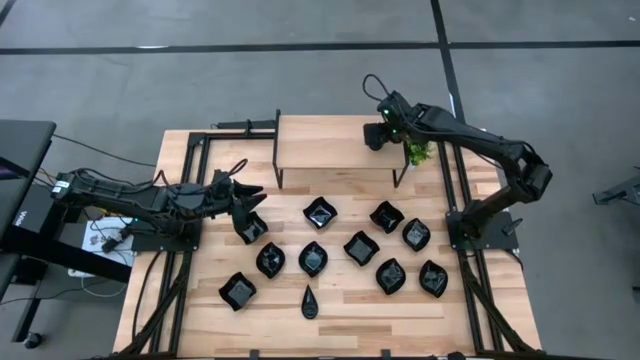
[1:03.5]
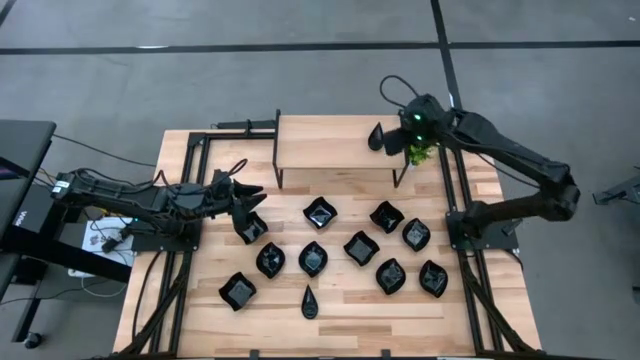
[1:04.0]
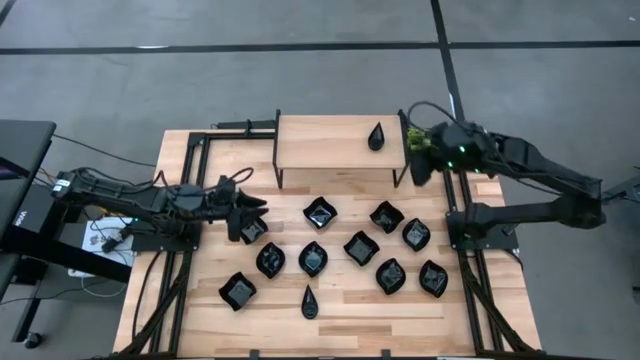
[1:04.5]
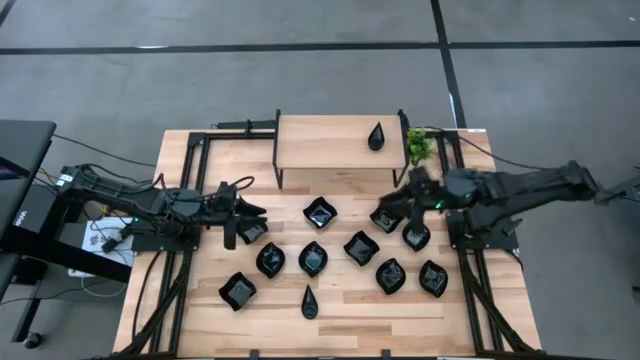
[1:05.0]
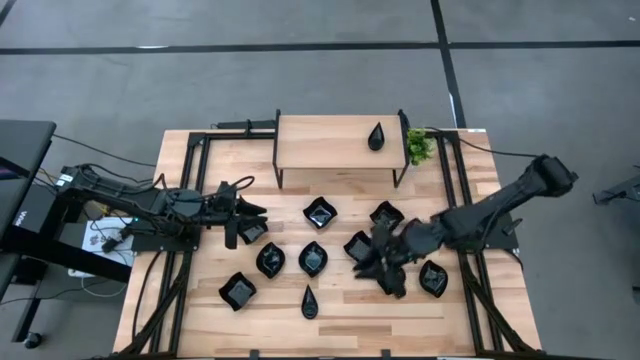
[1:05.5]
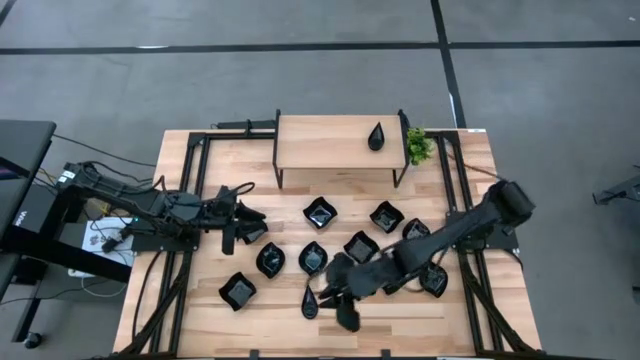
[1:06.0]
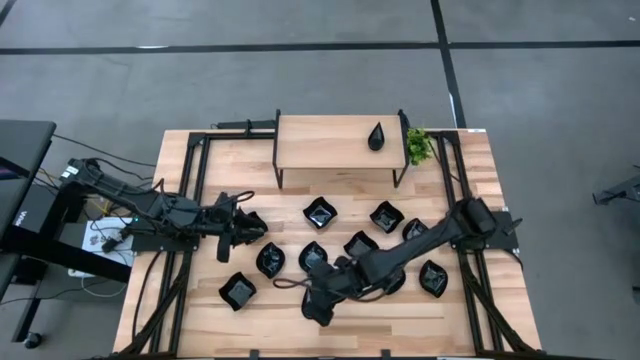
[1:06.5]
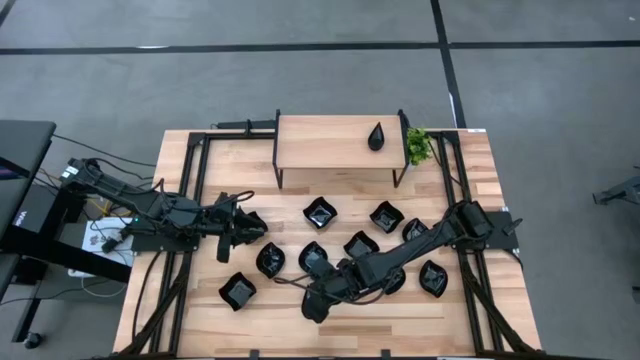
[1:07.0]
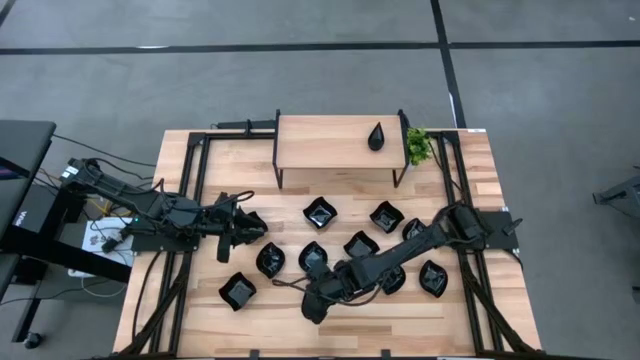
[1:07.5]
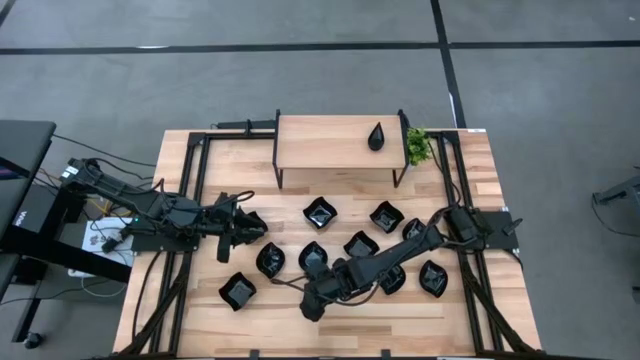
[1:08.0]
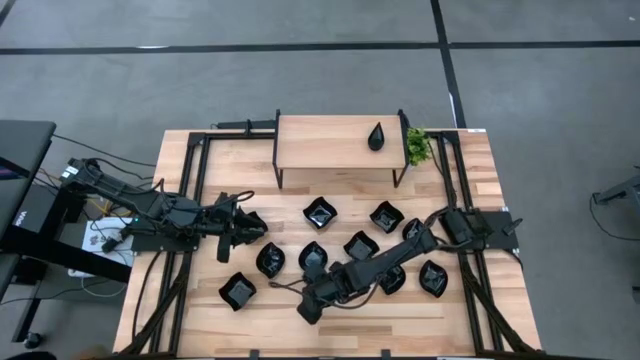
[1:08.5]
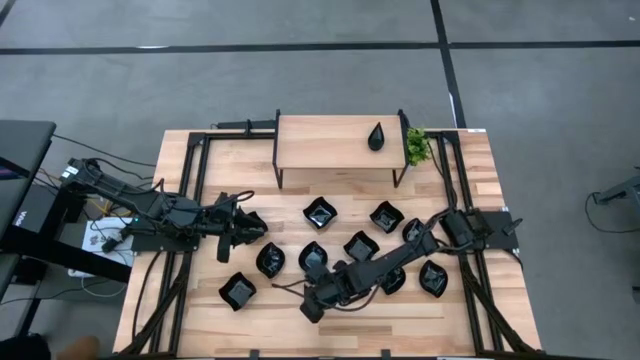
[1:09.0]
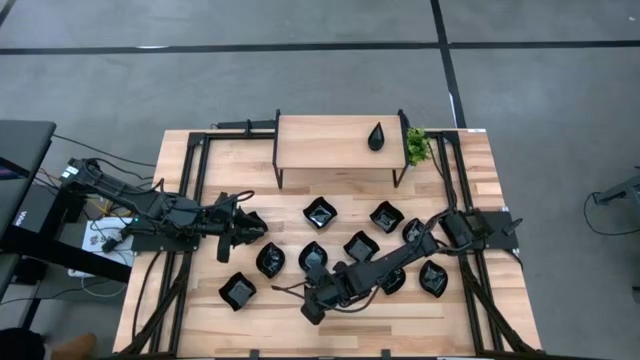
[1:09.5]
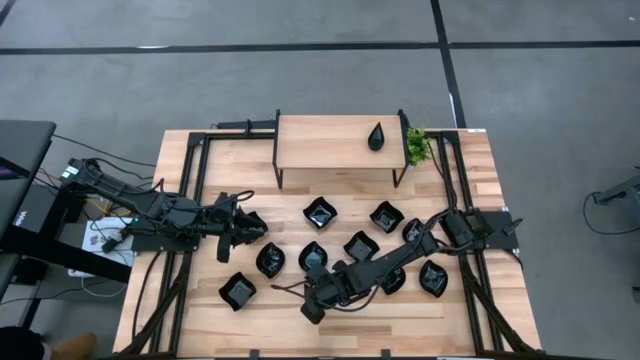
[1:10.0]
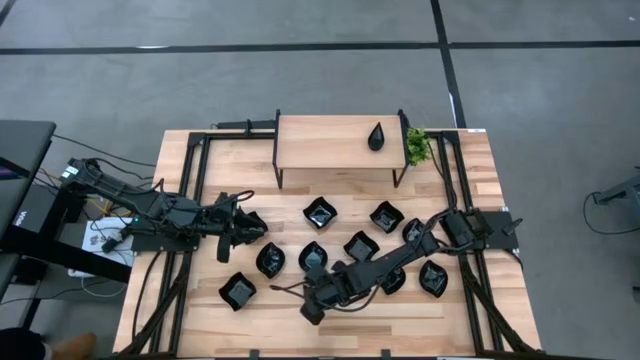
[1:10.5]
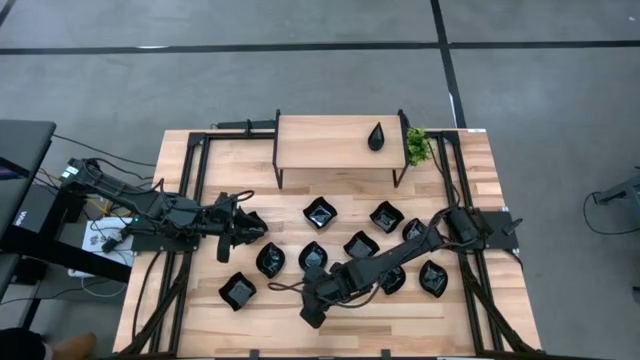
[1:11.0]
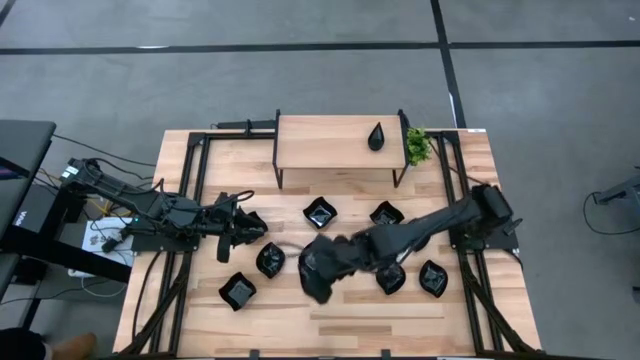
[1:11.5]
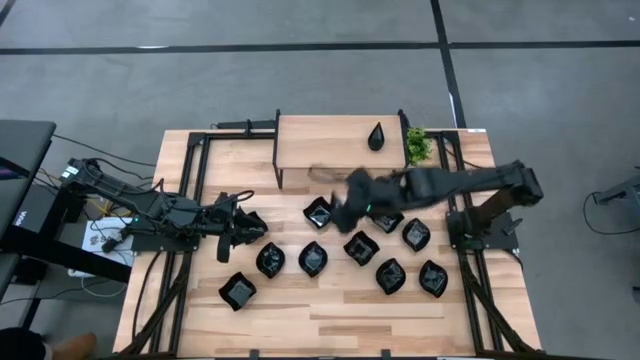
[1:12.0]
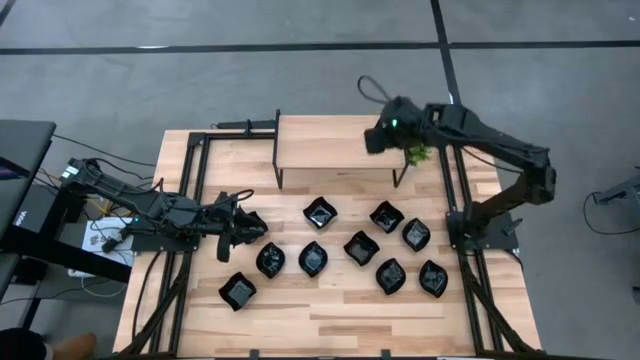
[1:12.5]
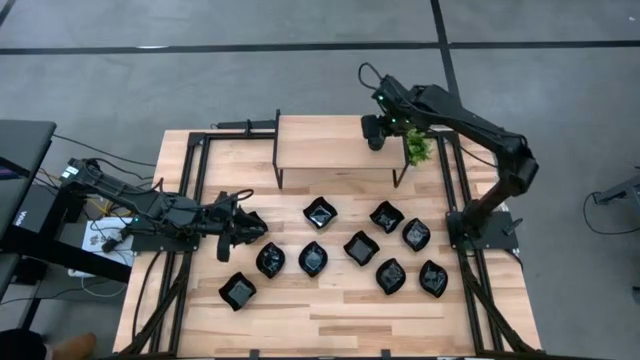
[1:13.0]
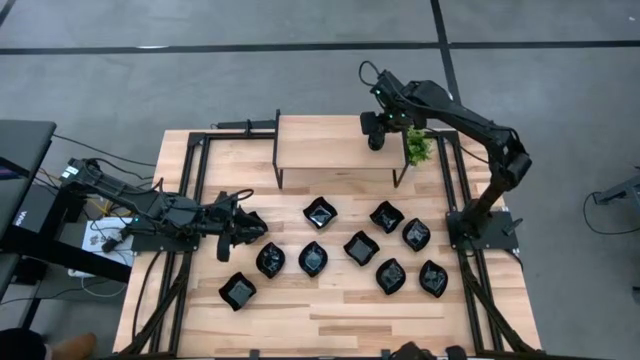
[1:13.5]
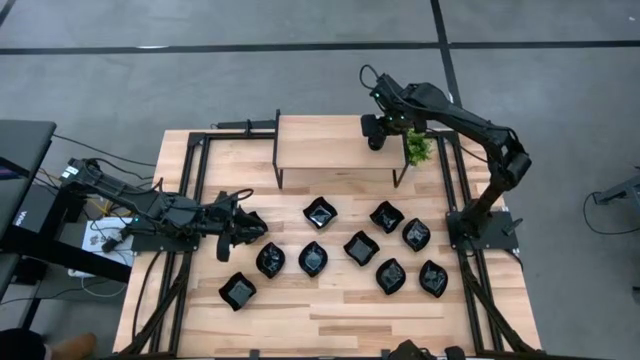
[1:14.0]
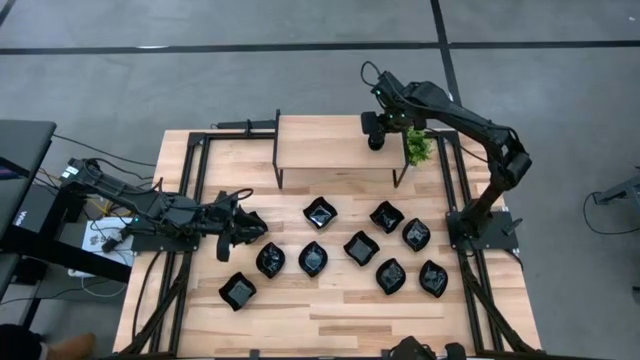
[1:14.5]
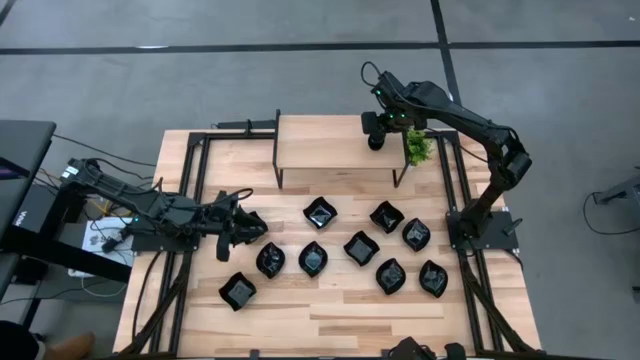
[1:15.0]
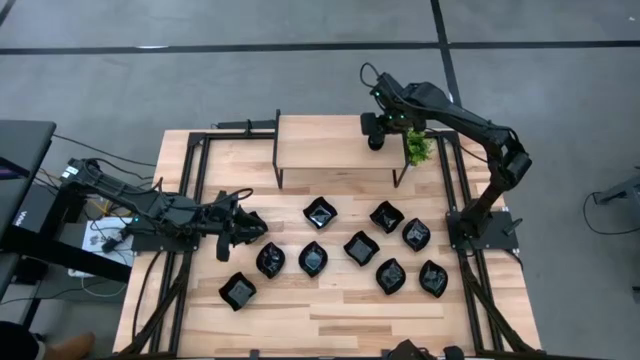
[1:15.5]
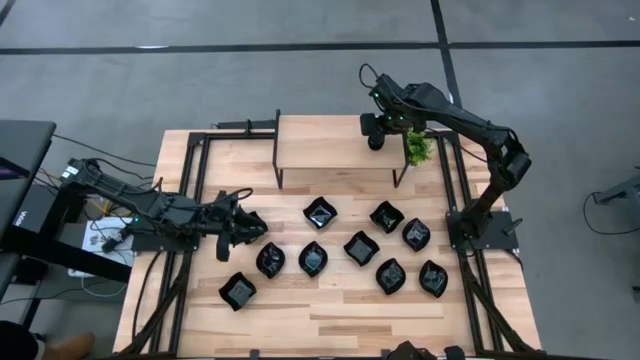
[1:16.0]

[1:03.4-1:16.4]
Task: Pick & Place Mini shaped plates
Stack the drop-shaped plate on top of the other drop-shaped plates on the shelf

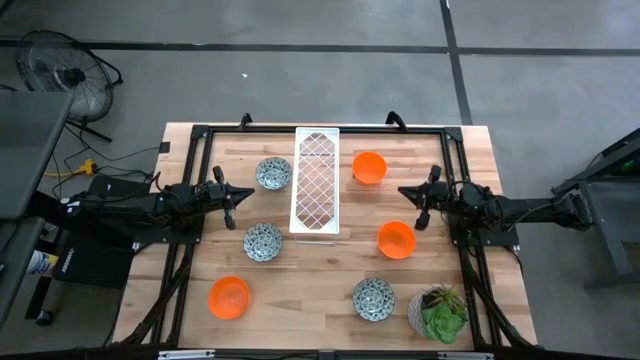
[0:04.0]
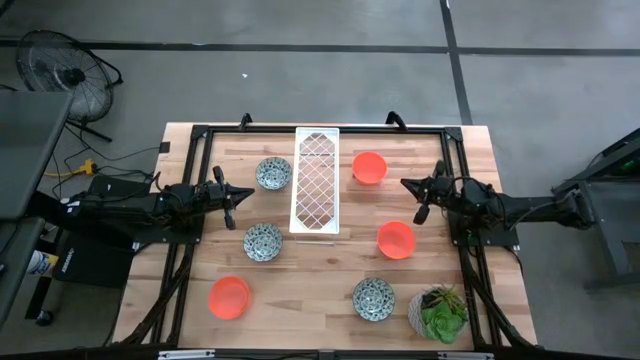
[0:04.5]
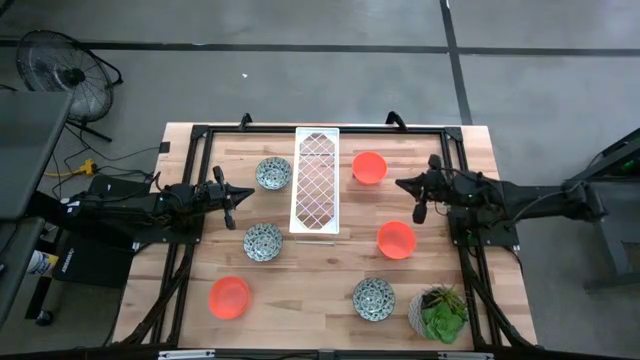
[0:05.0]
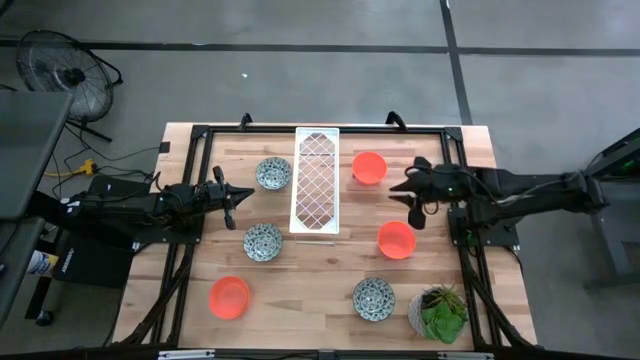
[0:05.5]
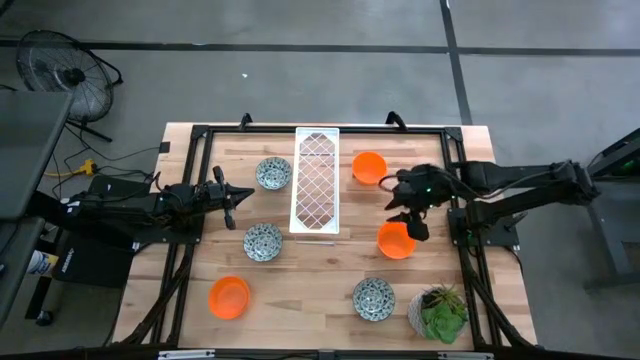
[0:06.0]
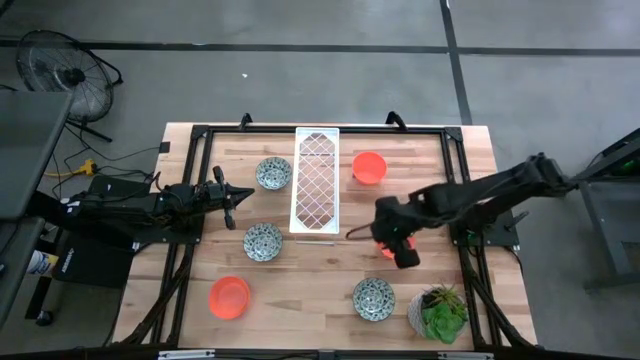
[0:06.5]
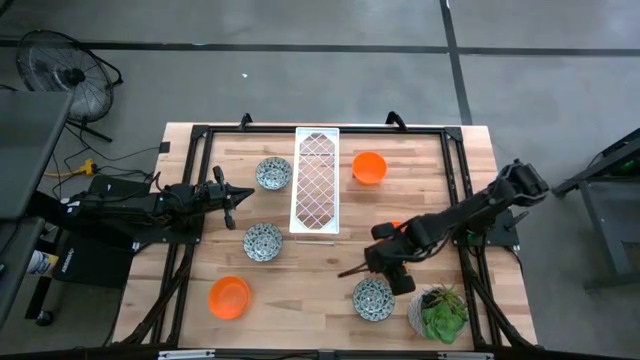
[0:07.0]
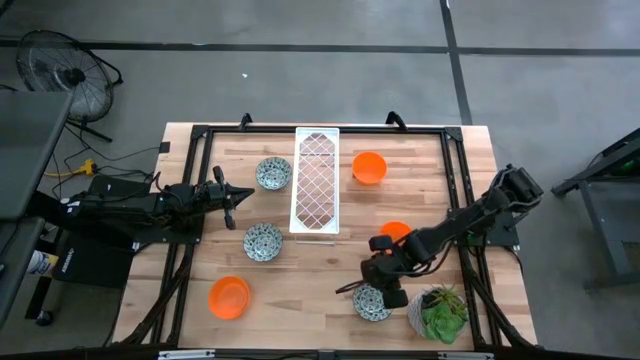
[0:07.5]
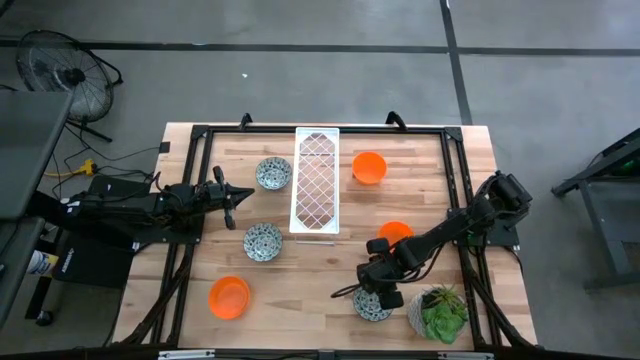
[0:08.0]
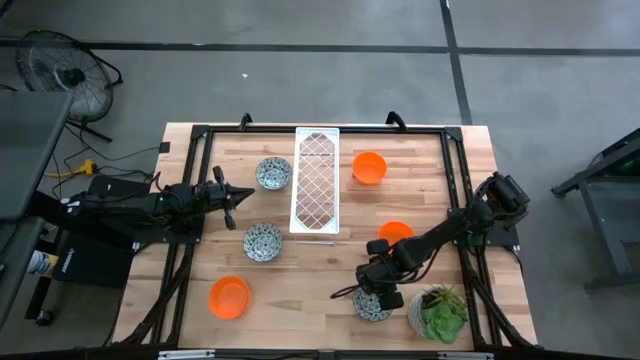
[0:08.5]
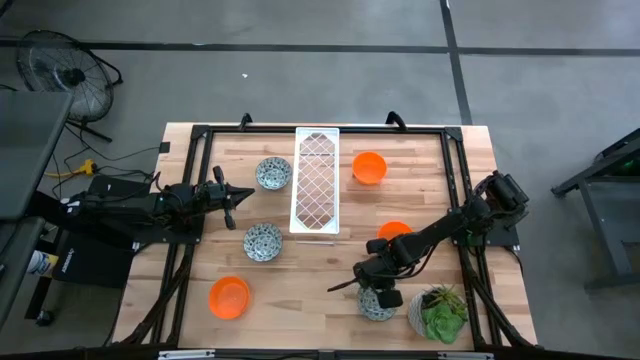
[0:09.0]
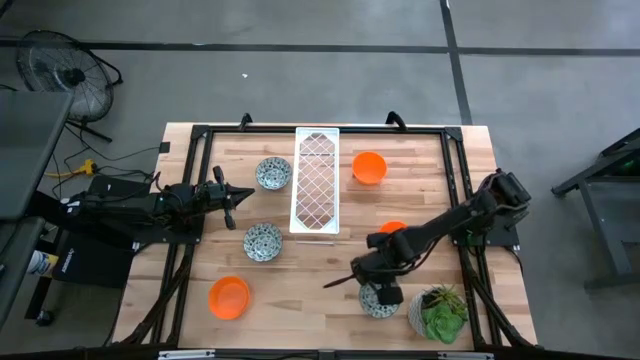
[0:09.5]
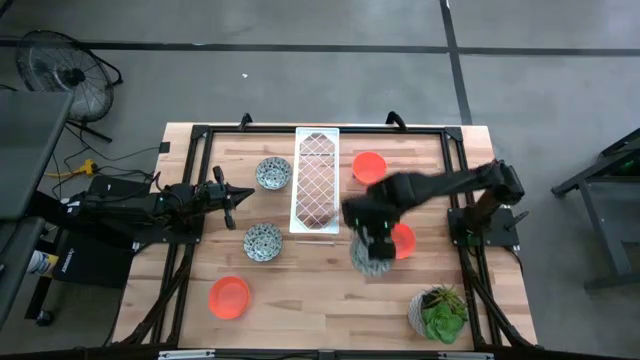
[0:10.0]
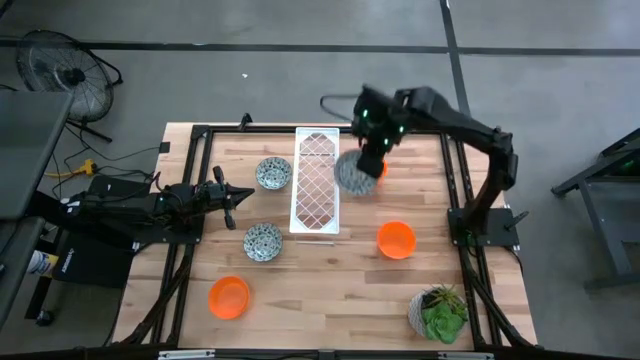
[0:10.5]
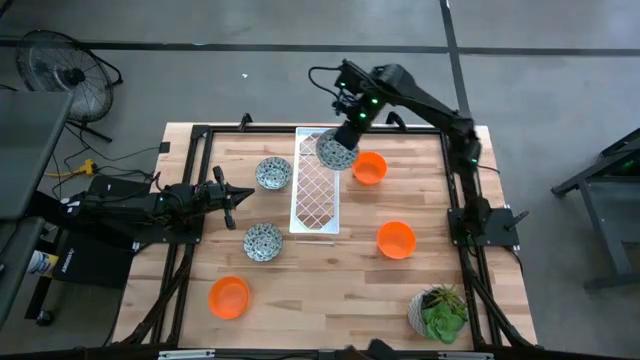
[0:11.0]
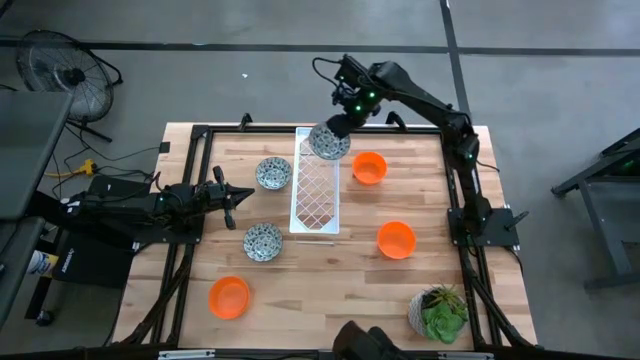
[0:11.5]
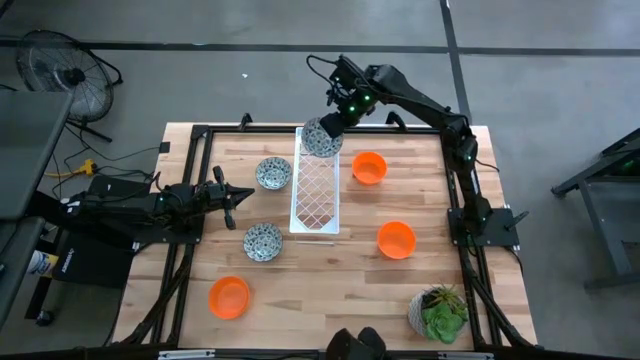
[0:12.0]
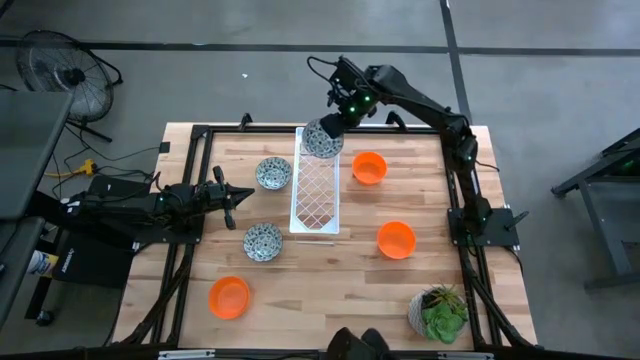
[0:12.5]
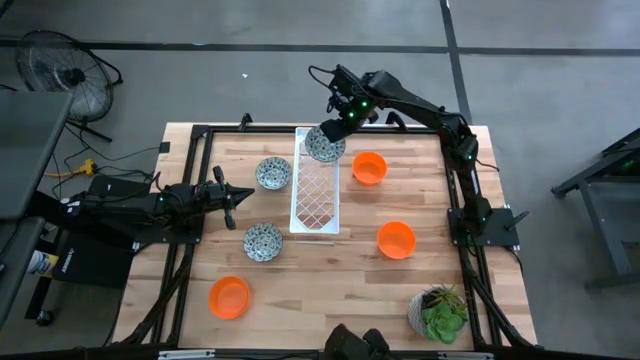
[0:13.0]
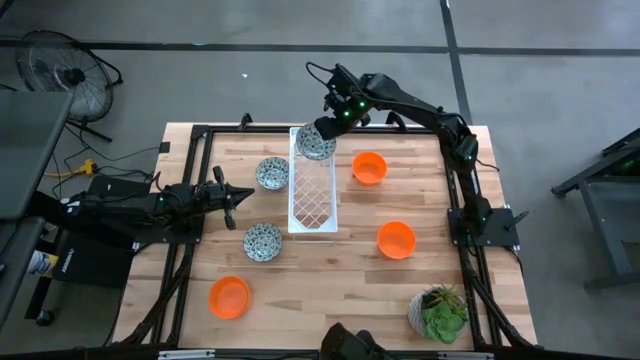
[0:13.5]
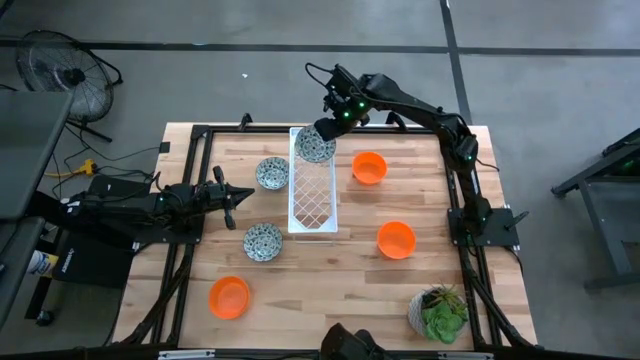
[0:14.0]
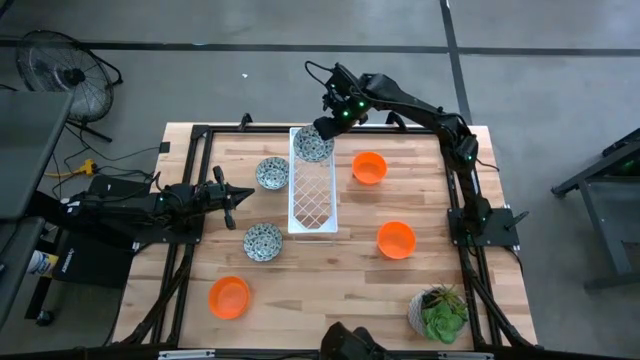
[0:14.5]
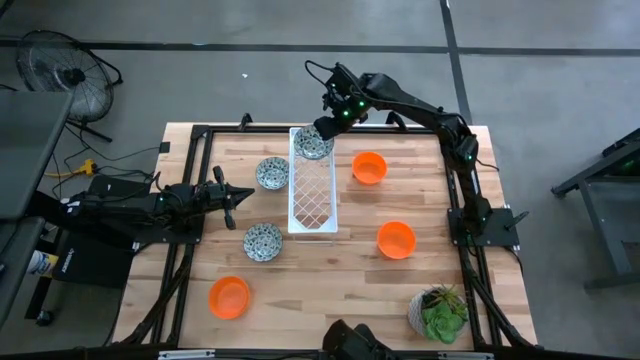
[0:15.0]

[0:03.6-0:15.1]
Task: Pick & Place Mini bowls
Put the bottom right white bowl on the shelf
